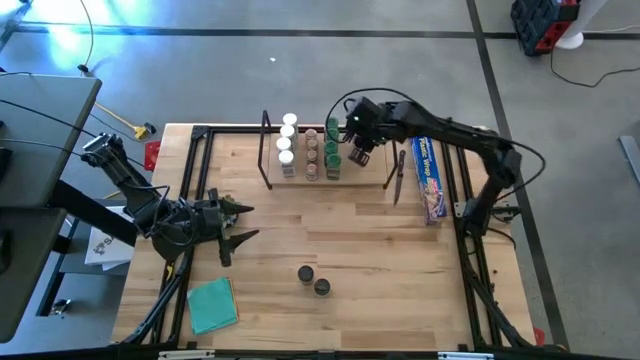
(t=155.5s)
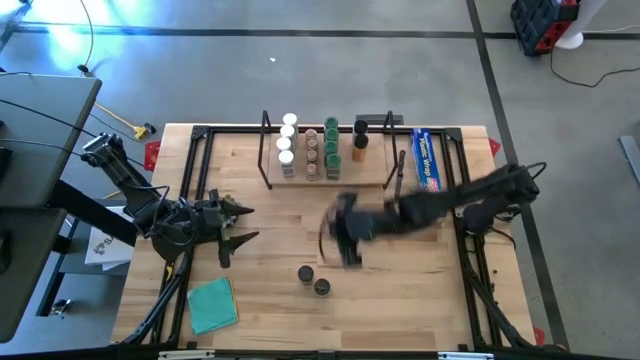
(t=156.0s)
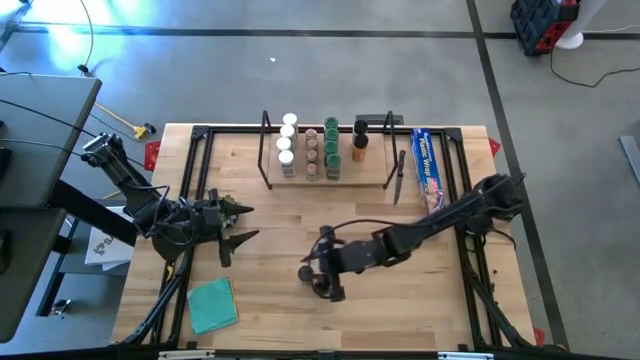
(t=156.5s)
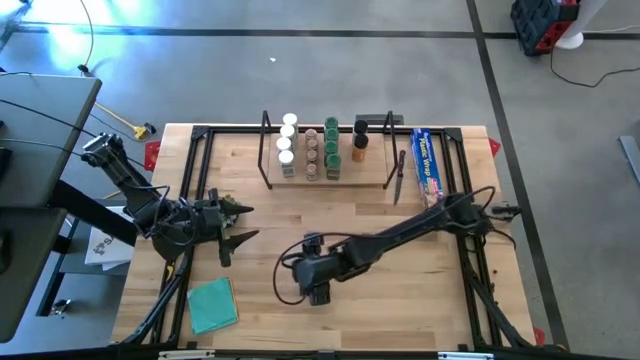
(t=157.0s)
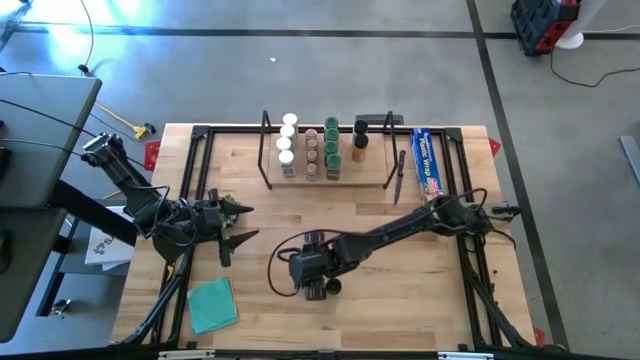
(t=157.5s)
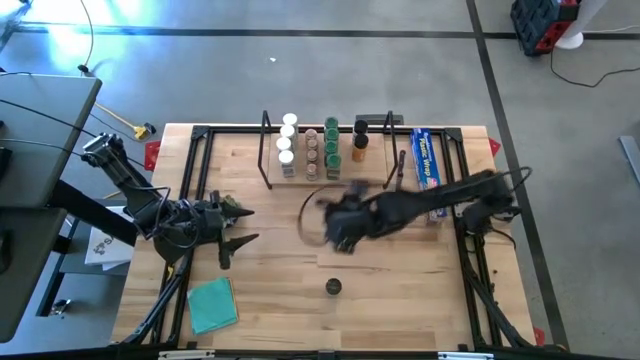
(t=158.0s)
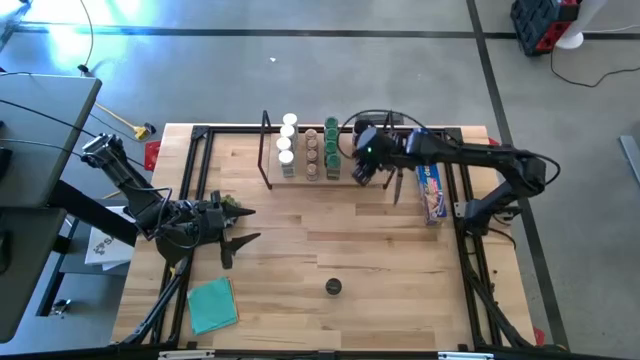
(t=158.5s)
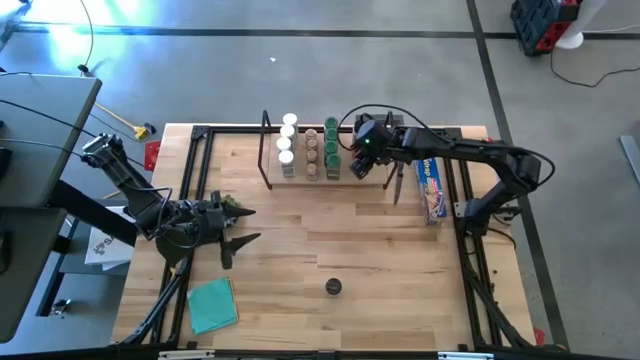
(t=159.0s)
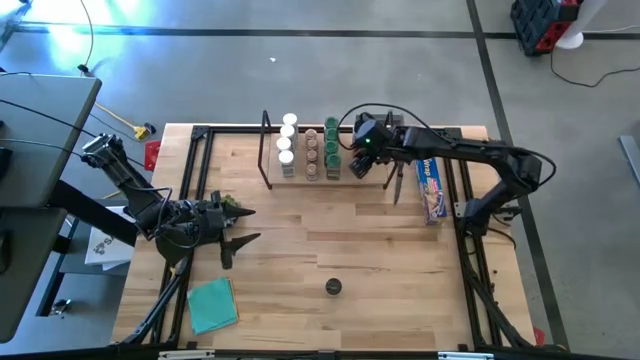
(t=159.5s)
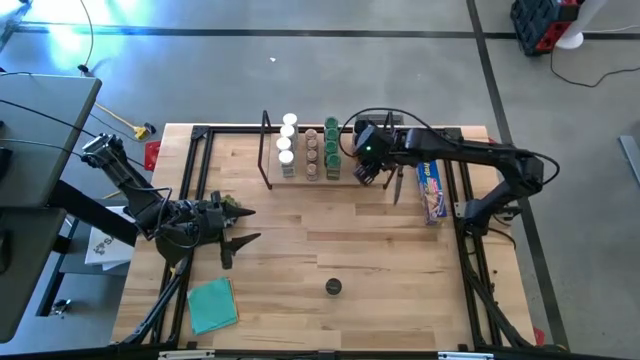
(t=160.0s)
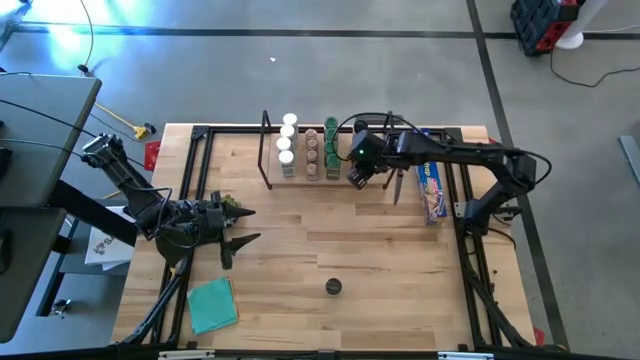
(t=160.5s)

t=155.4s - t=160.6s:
Task: Shelf spices
Put the black seasoning bottle on the shelf aligned with the other black seasoning bottles

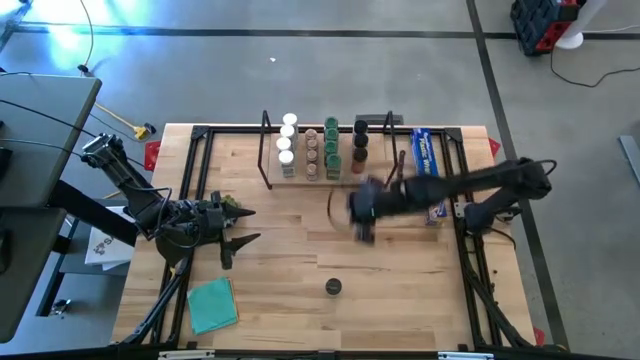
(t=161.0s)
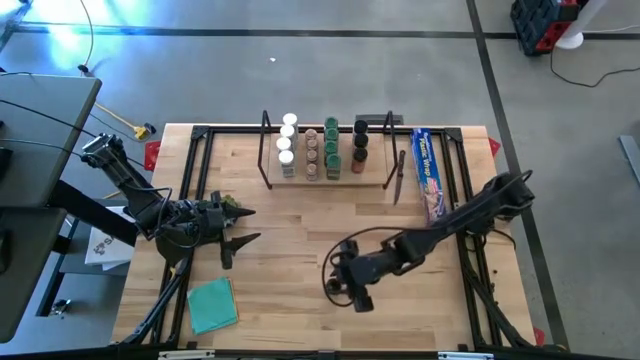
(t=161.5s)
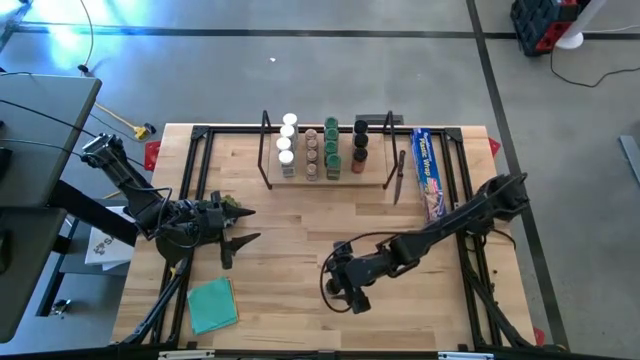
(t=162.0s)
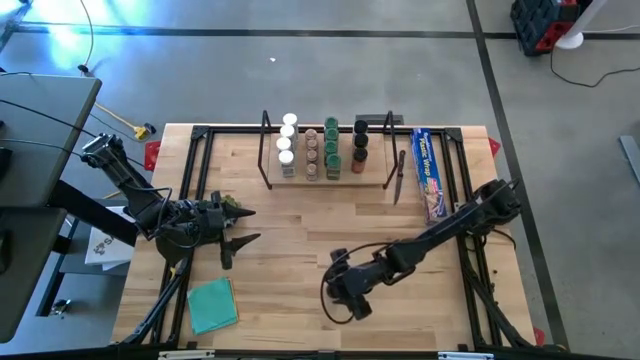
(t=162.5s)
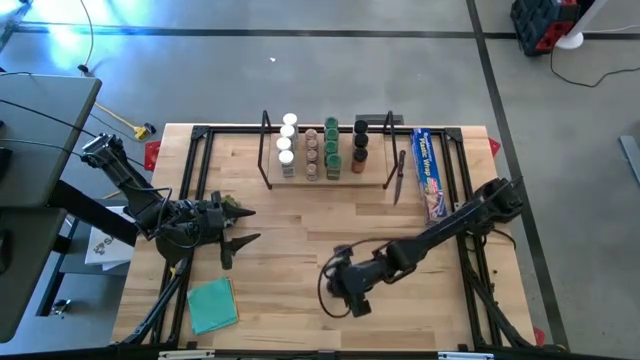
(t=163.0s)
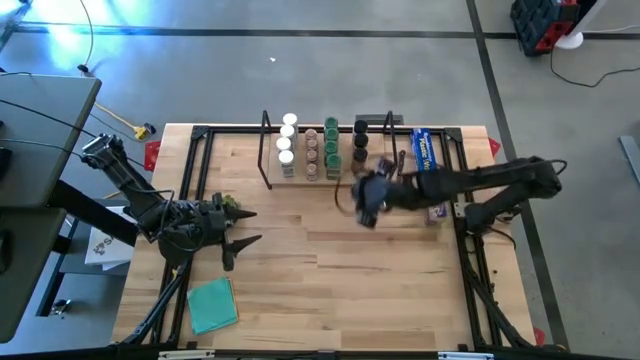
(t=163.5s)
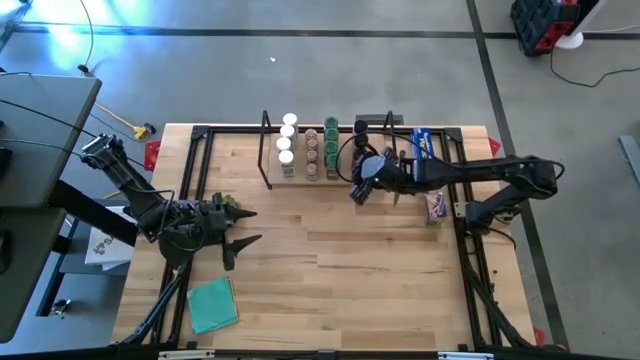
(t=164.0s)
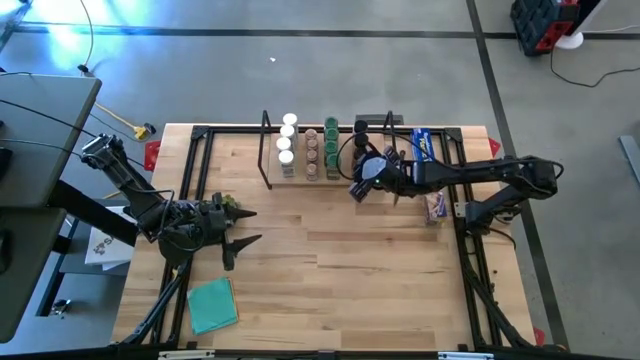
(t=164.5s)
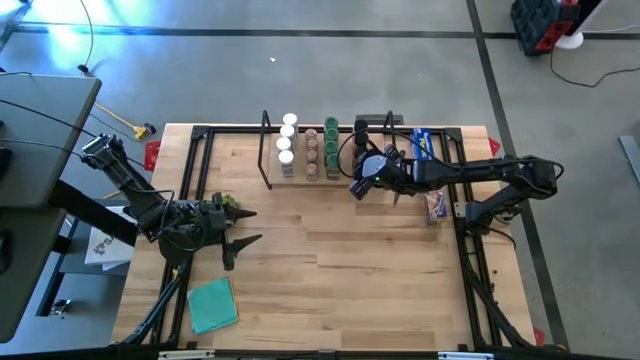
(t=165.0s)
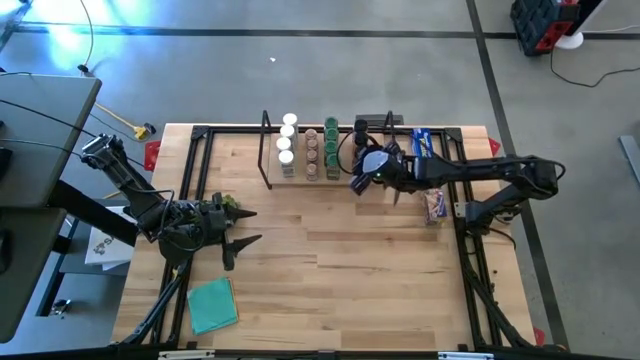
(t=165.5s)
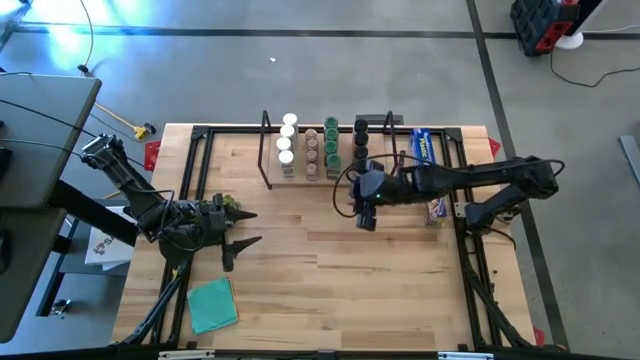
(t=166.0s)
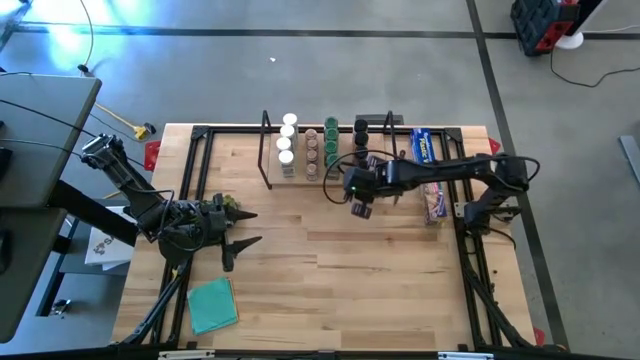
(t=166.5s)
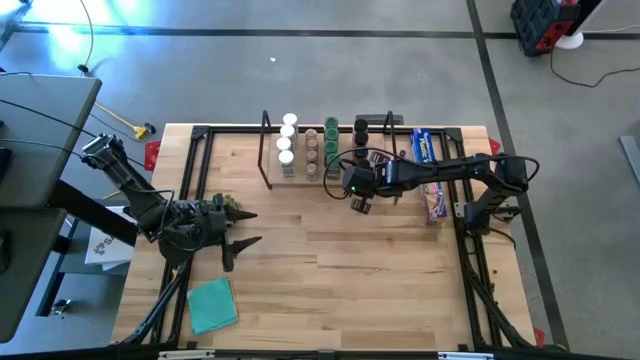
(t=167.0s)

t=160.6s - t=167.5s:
Put the black seasoning bottle on the shelf aligned with the other black seasoning bottles

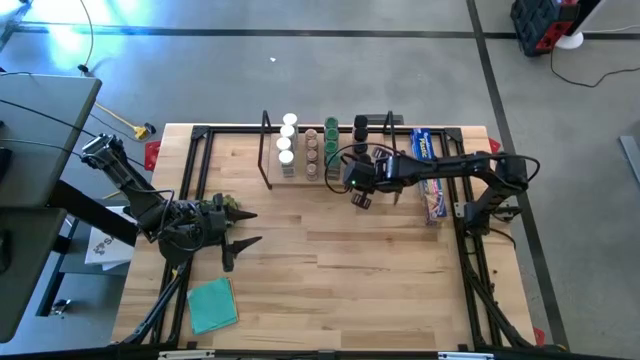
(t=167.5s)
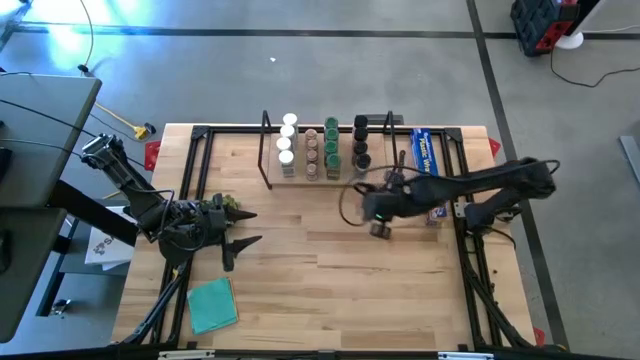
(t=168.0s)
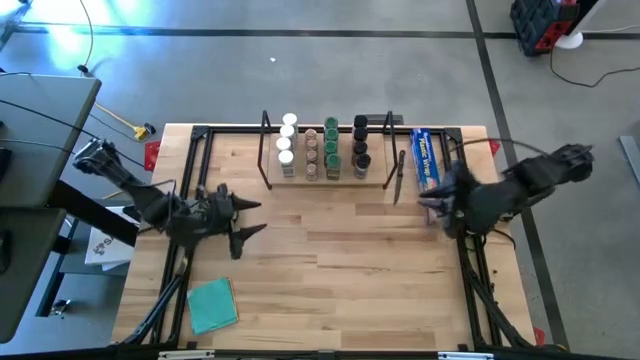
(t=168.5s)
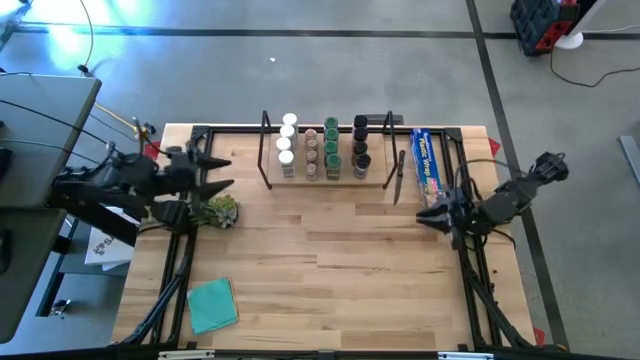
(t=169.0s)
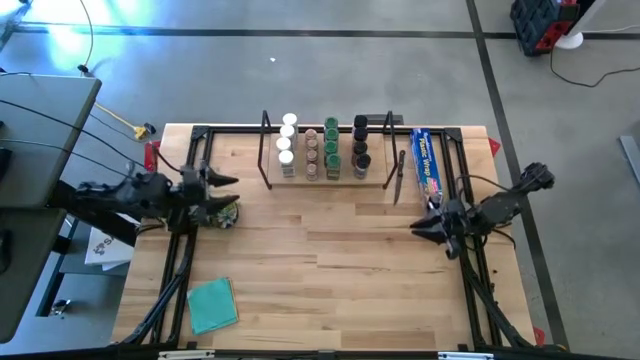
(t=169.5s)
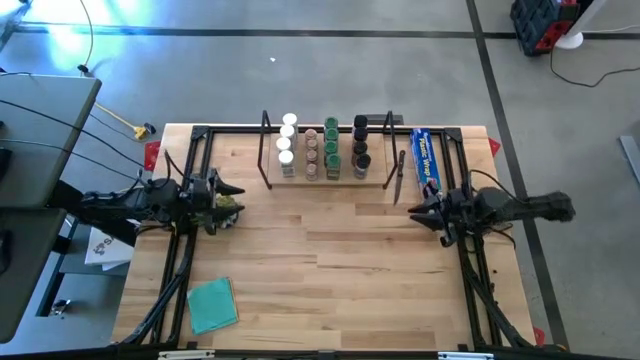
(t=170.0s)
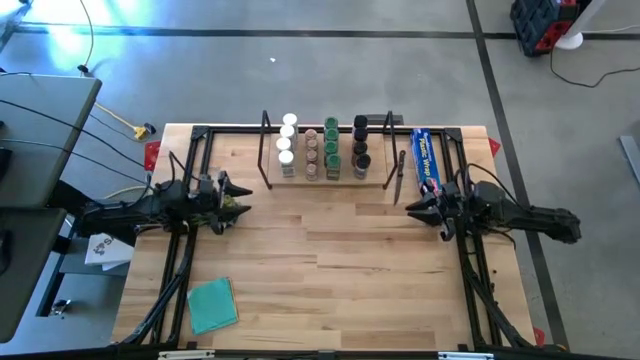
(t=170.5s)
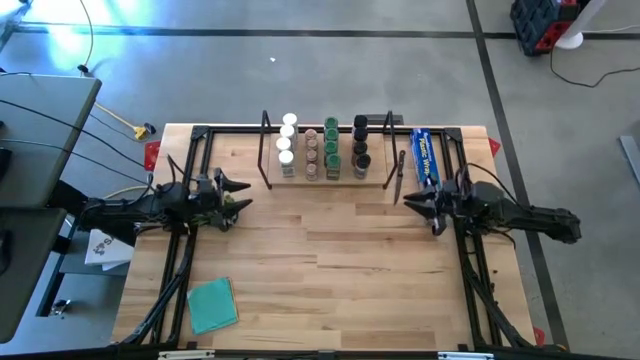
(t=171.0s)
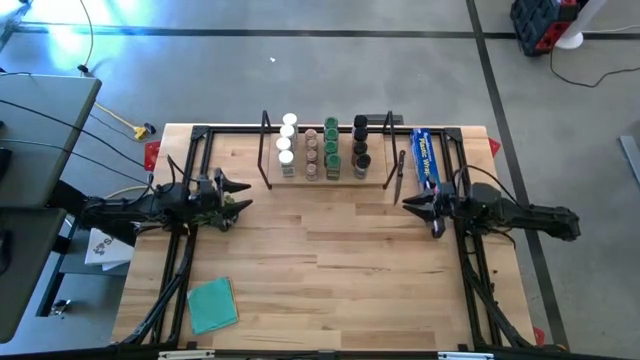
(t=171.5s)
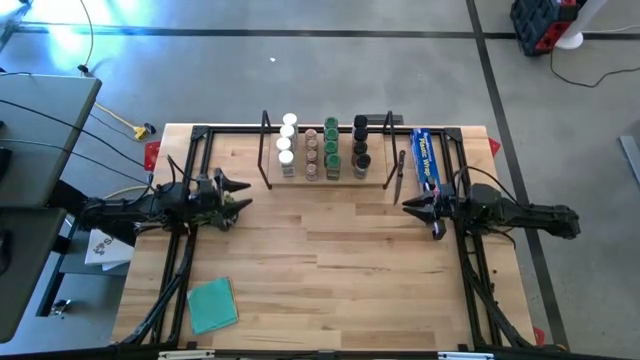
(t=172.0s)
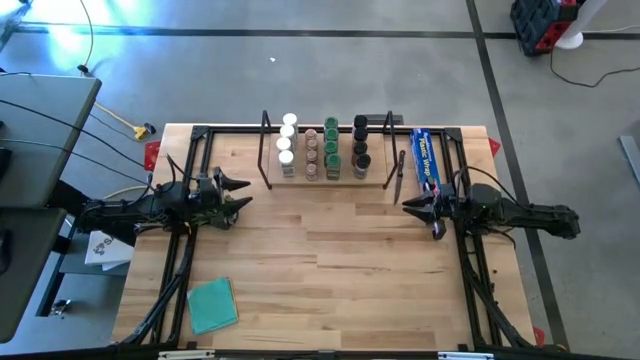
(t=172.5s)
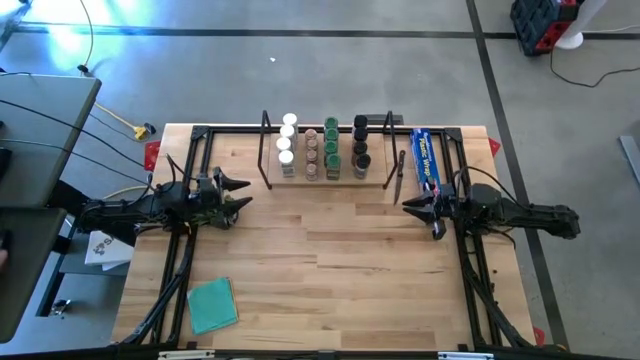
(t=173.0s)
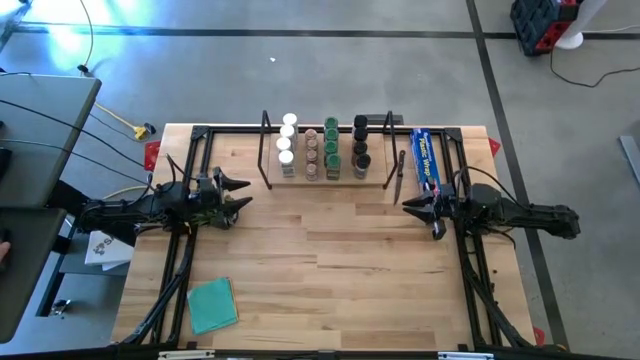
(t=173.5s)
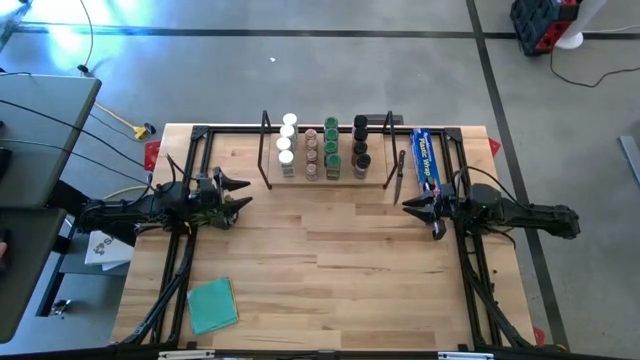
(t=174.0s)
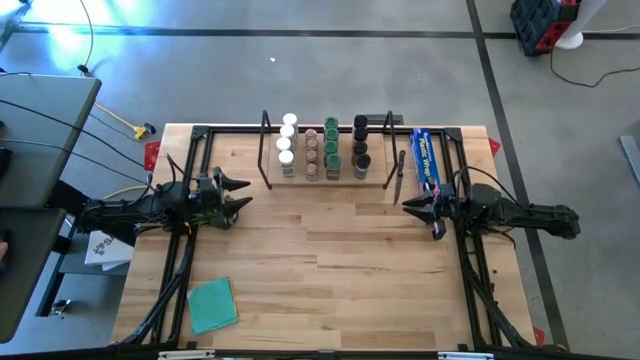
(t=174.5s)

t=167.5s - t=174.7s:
Return to Home Position

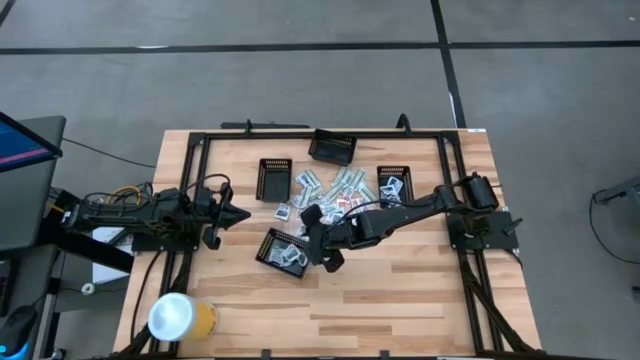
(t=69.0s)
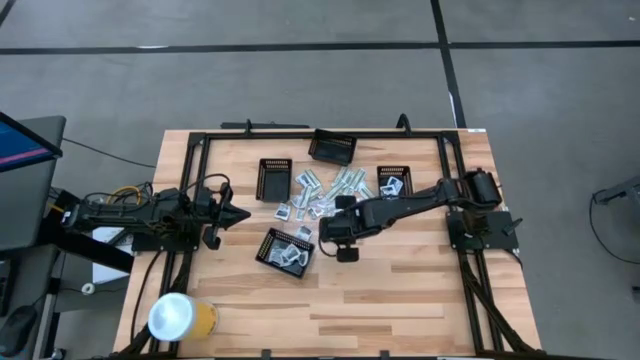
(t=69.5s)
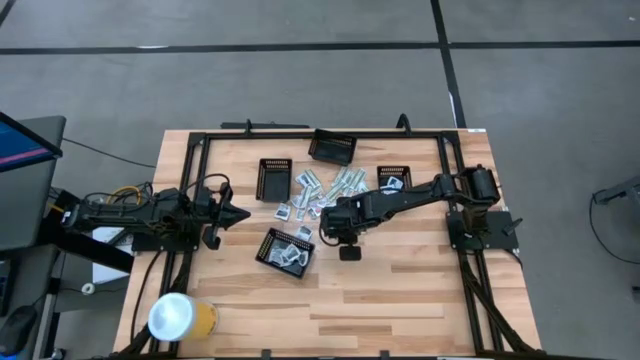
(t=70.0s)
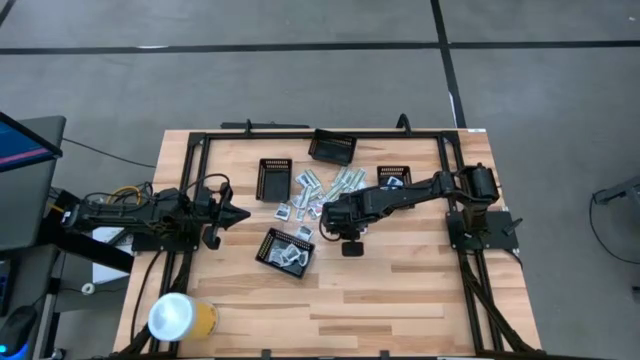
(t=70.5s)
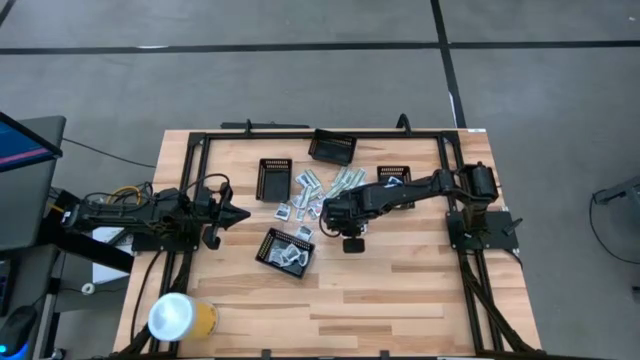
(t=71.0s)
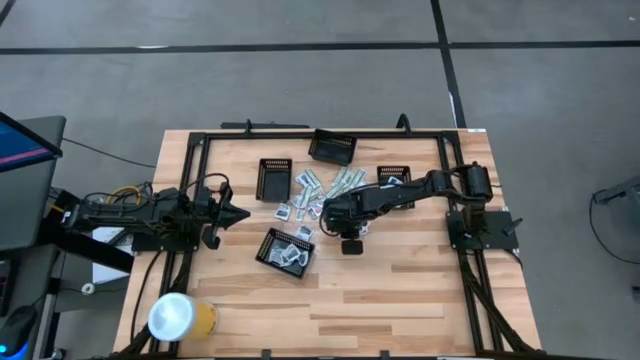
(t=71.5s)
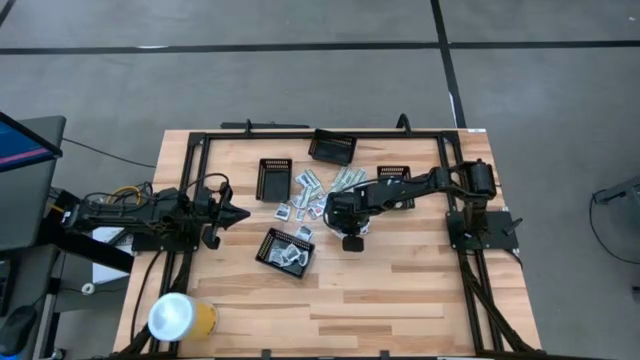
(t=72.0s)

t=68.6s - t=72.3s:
Task: Pick & Place First Aid Supplies
Put the white towelette pack into the bottom black bin
